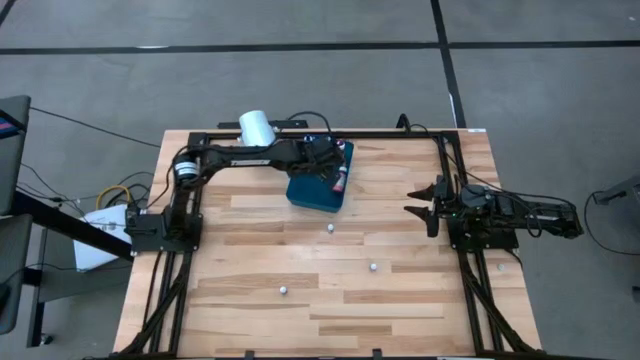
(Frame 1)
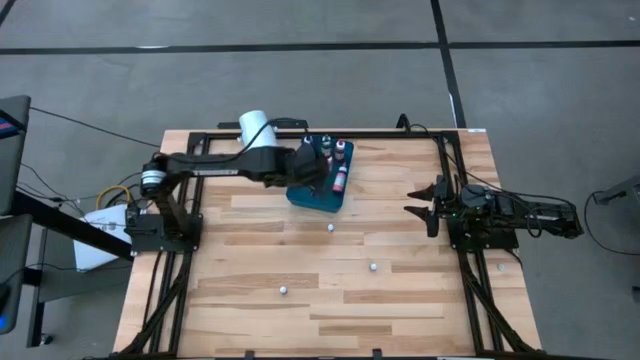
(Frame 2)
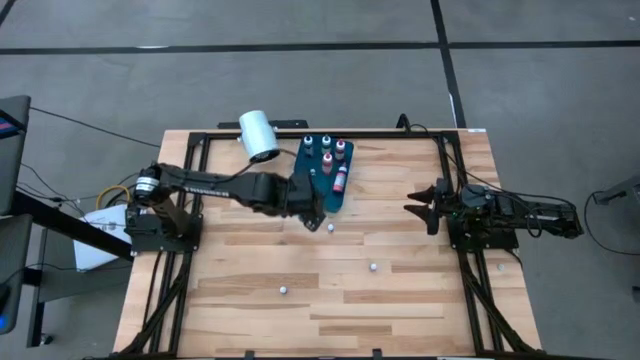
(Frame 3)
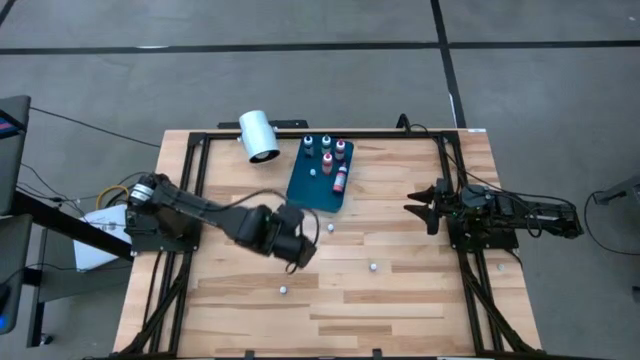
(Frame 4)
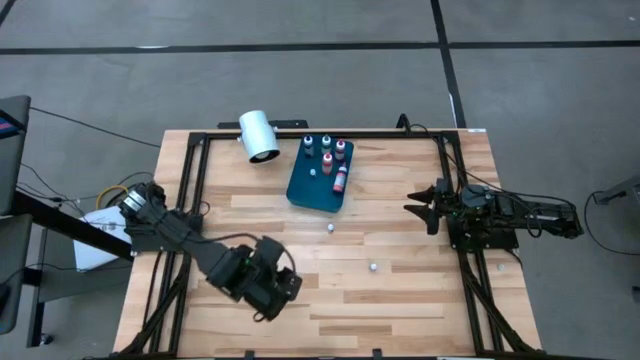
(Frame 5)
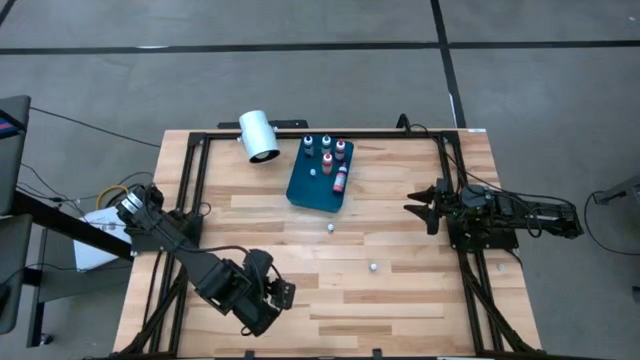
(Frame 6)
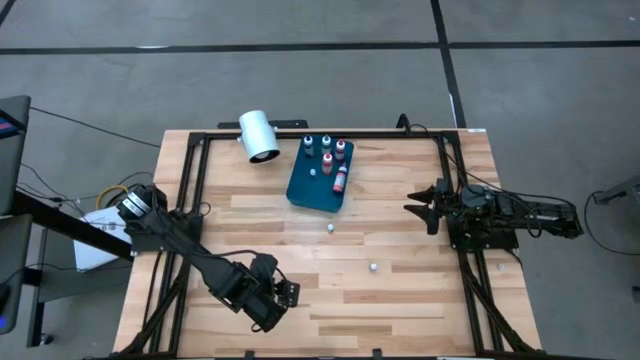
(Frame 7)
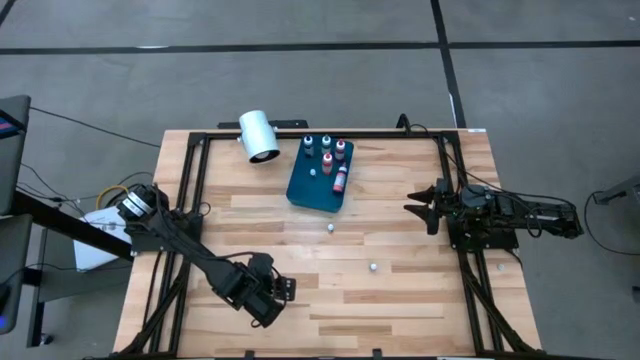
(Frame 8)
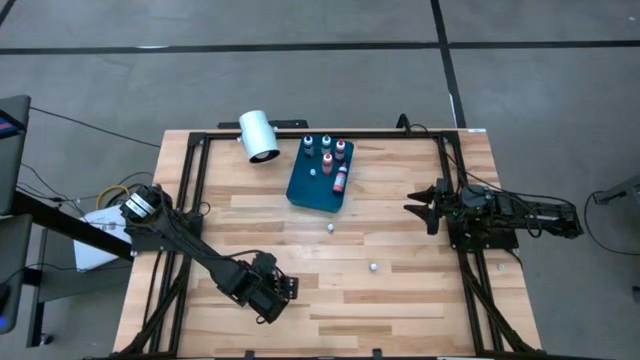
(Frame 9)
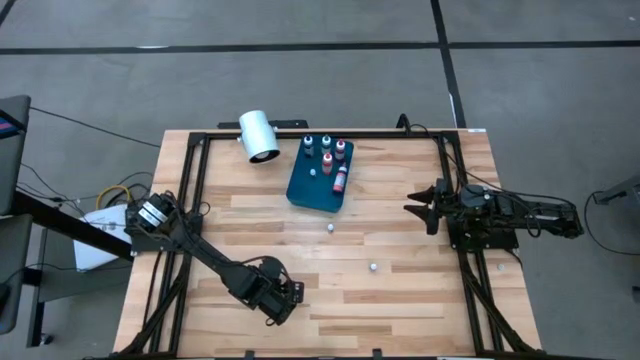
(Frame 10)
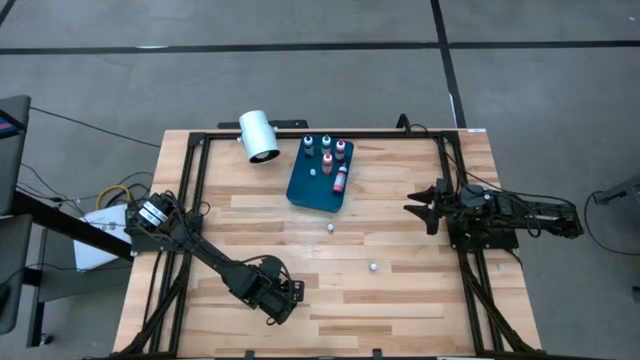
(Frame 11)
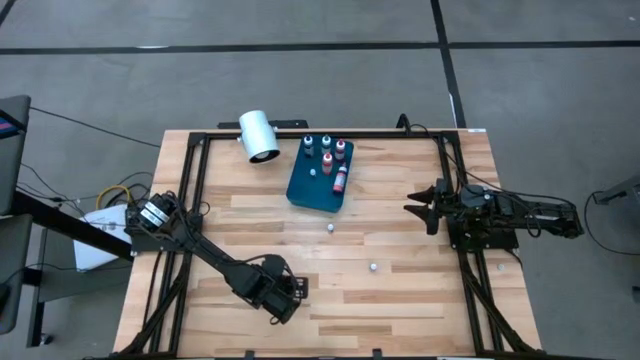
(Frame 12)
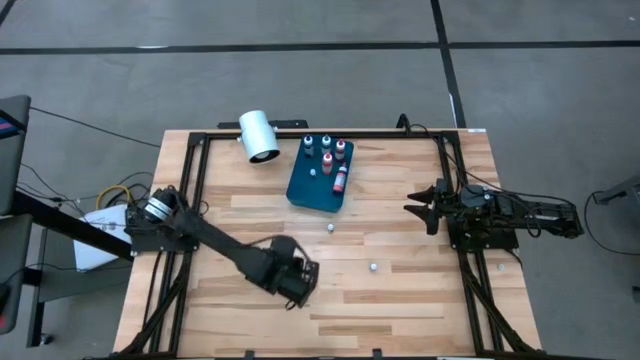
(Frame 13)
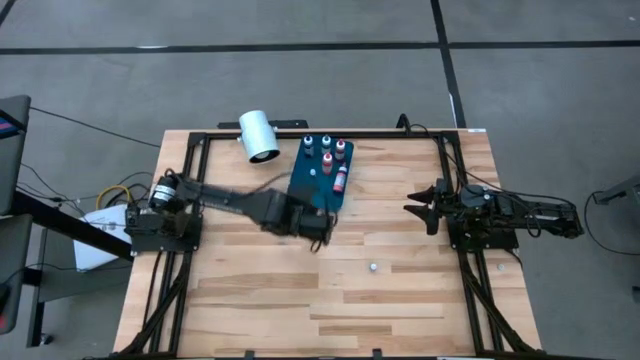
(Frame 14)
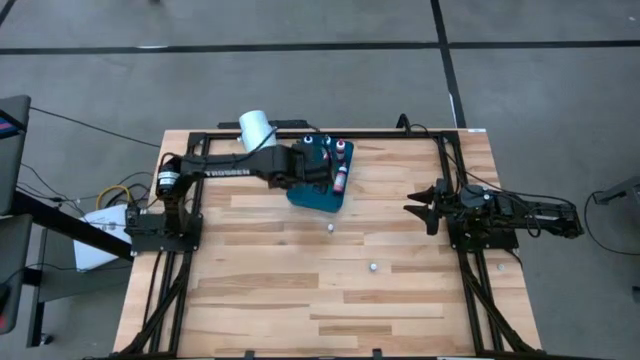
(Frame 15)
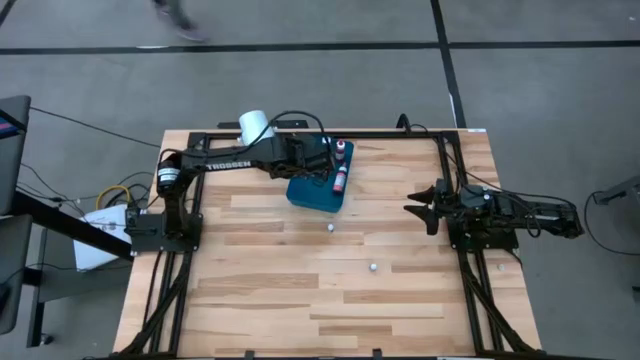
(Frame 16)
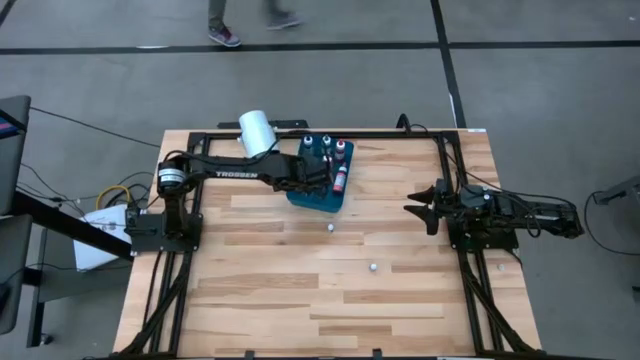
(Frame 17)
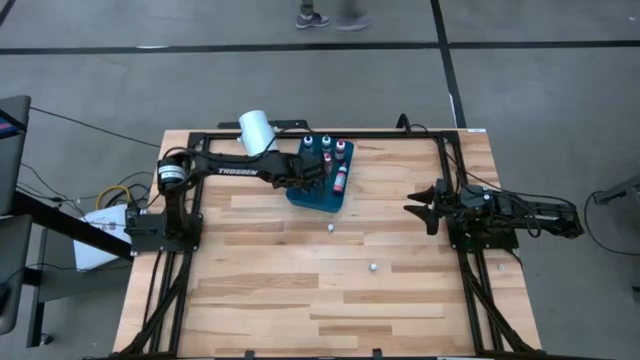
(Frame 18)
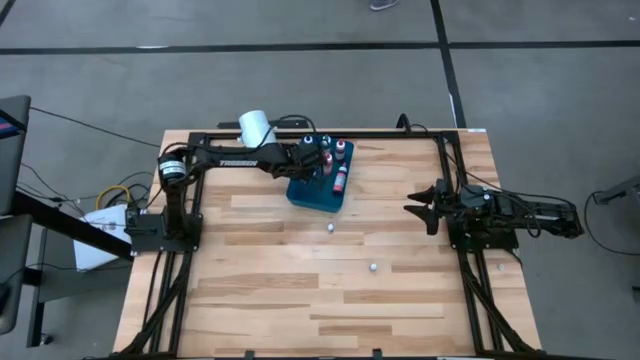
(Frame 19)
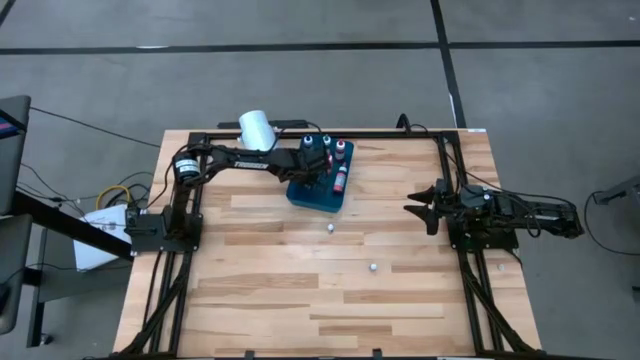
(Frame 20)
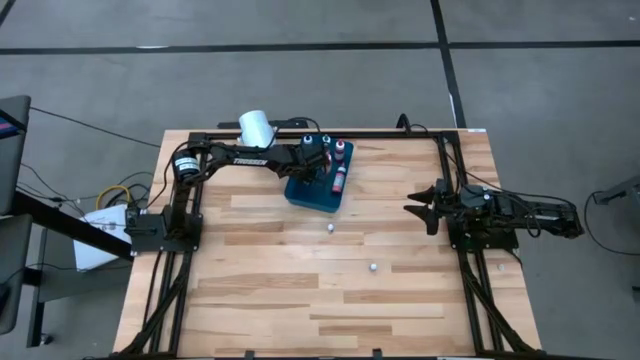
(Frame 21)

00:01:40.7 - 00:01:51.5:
Task: Pick & Place food coloring
Put the small black food coloring bottle into the blue bin

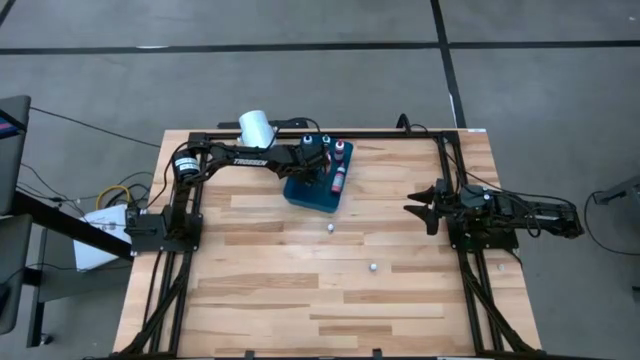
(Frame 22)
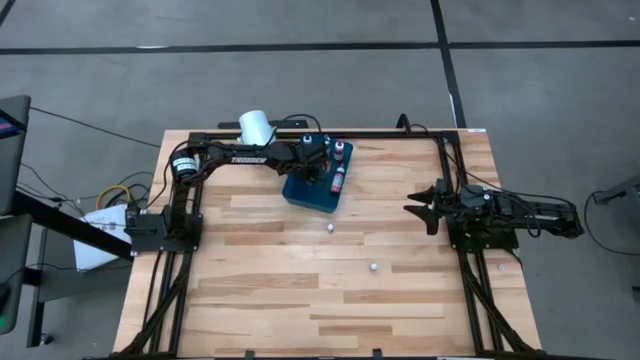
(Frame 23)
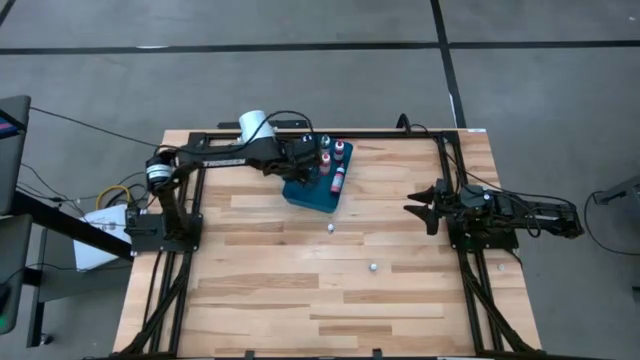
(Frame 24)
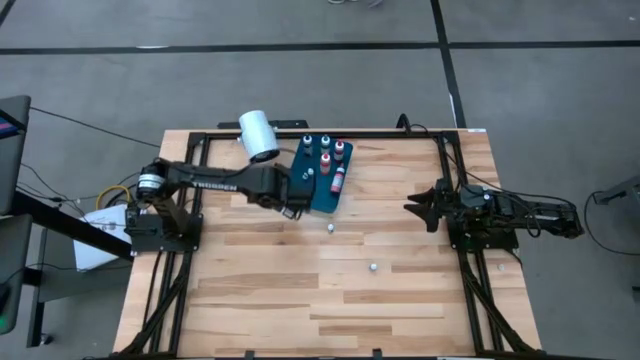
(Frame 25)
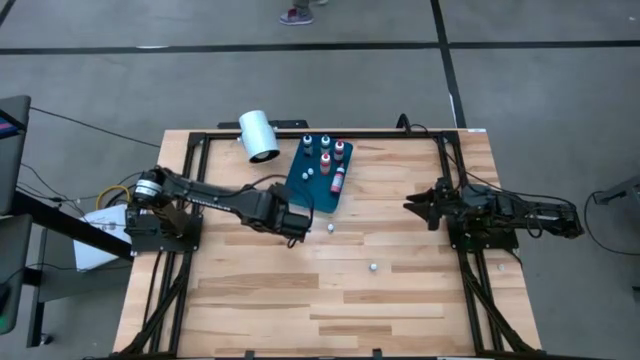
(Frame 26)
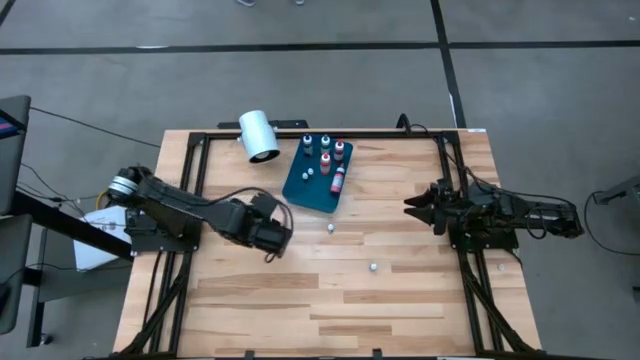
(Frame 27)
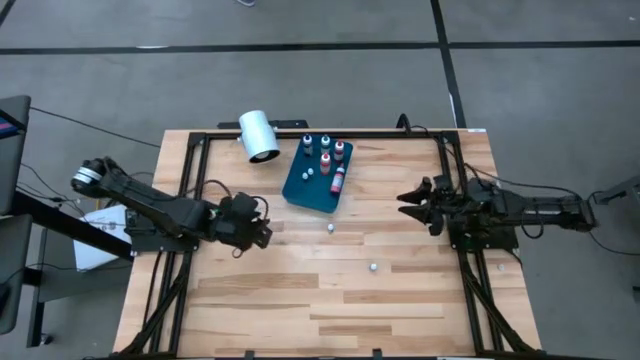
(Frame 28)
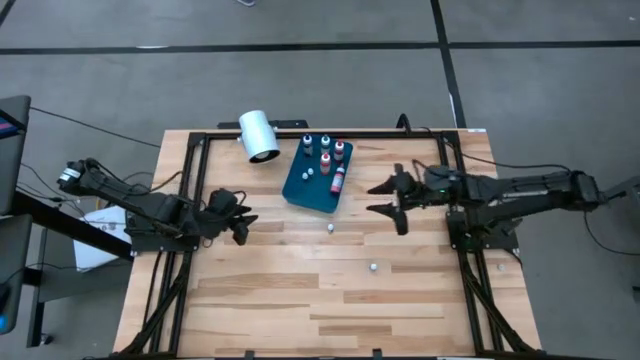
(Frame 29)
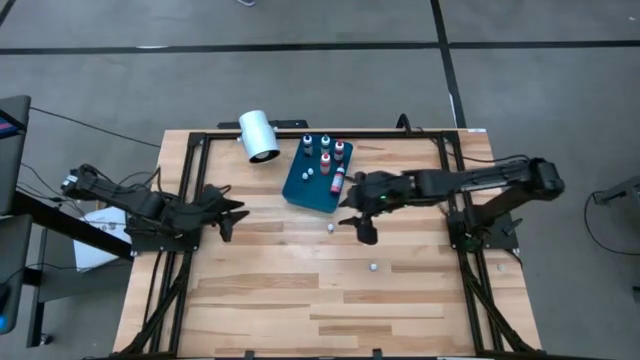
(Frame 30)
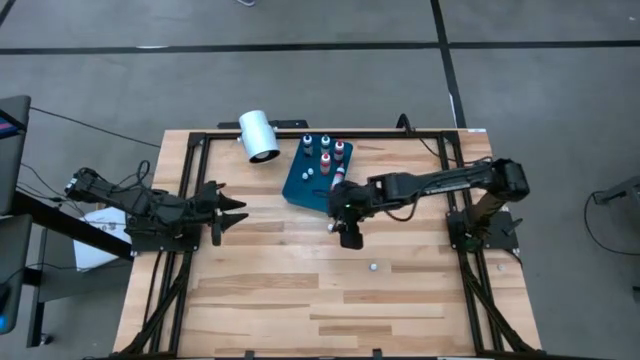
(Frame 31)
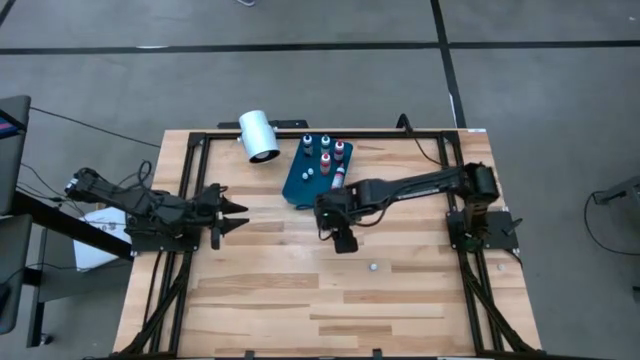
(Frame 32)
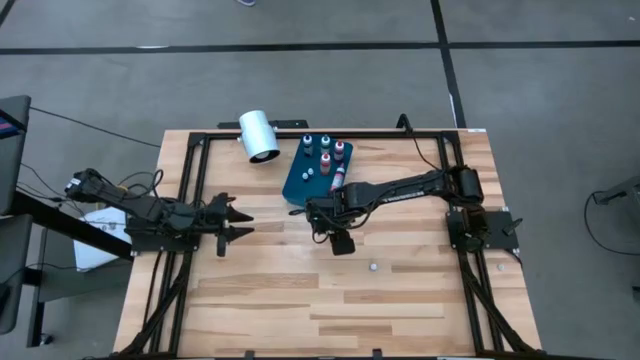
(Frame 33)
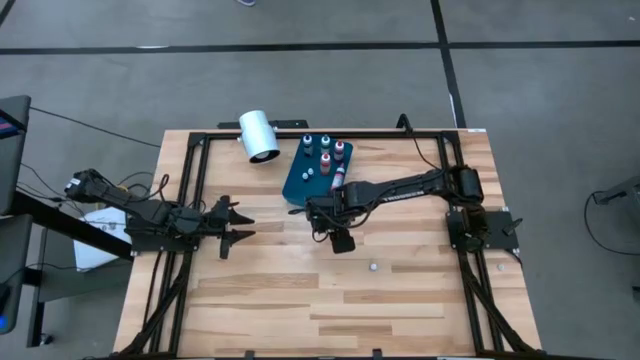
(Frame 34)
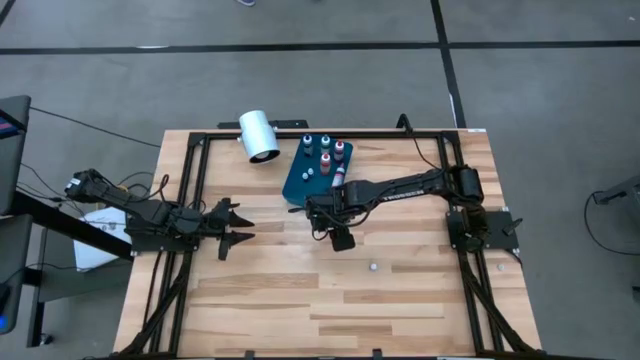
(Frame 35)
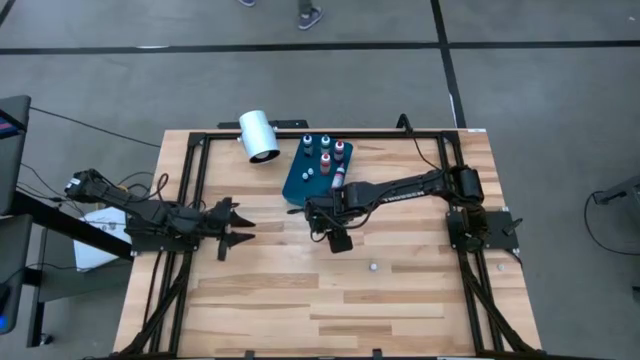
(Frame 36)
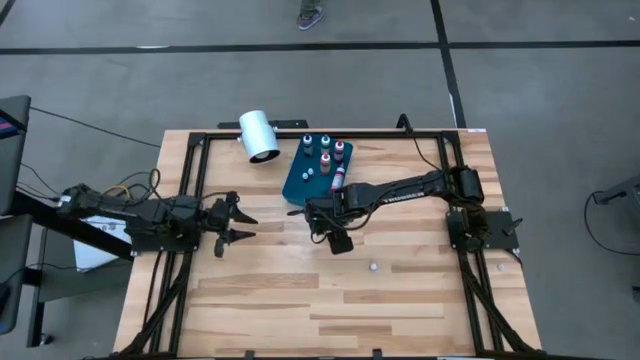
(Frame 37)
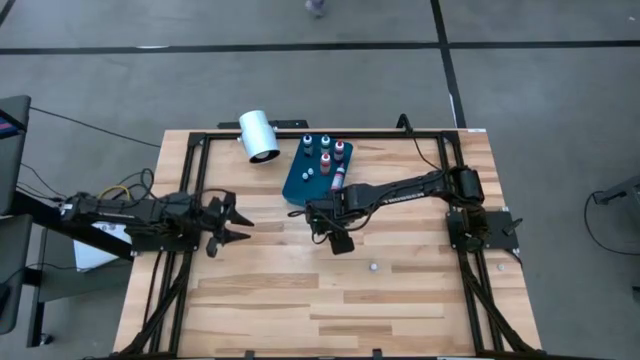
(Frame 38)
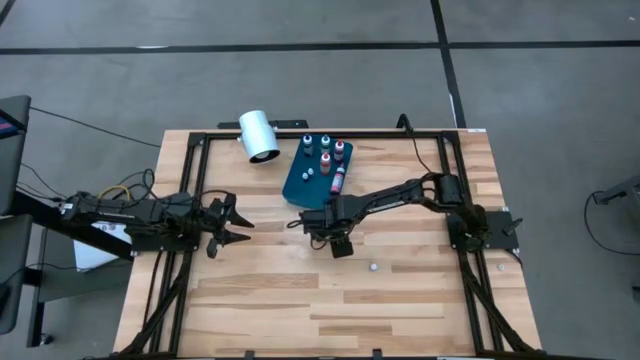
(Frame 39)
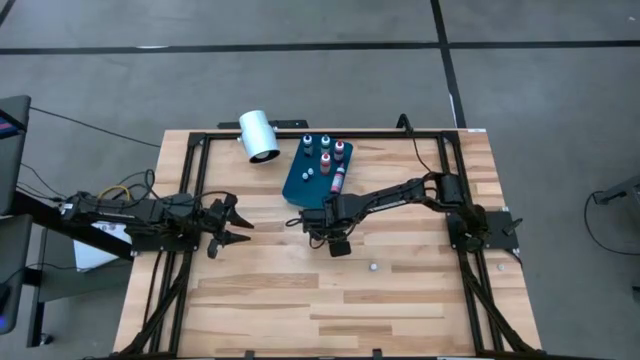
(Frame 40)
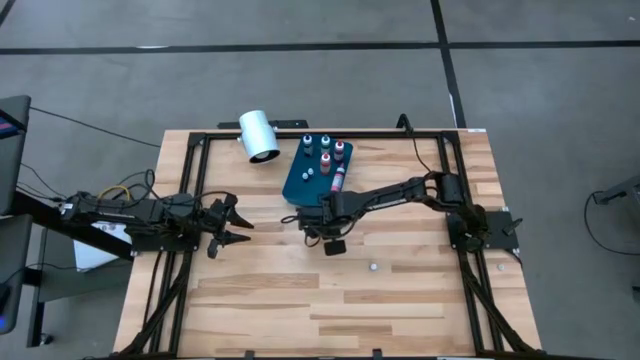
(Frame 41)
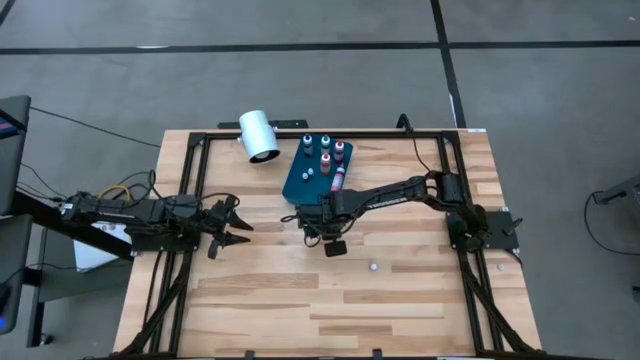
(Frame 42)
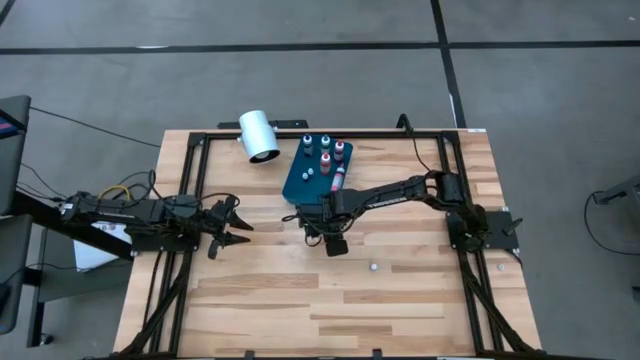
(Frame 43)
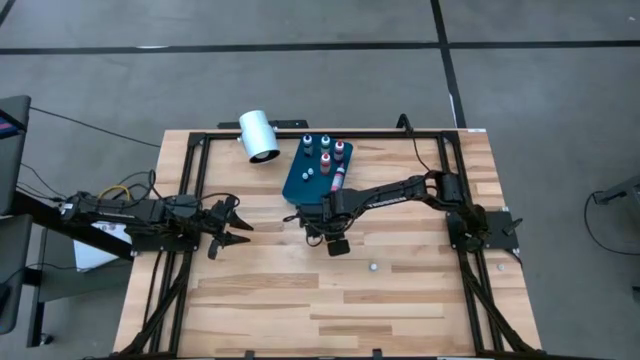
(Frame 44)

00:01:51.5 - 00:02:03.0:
Put the small violet food coloring bottle into the blue bin
